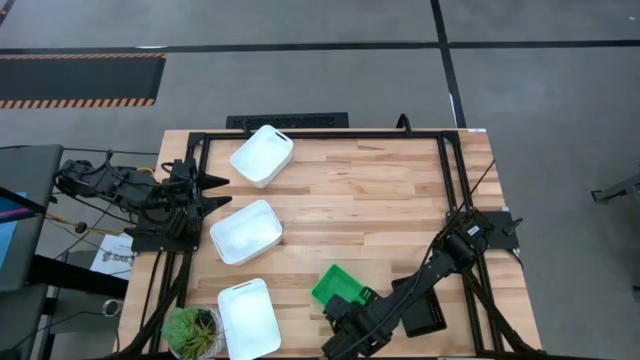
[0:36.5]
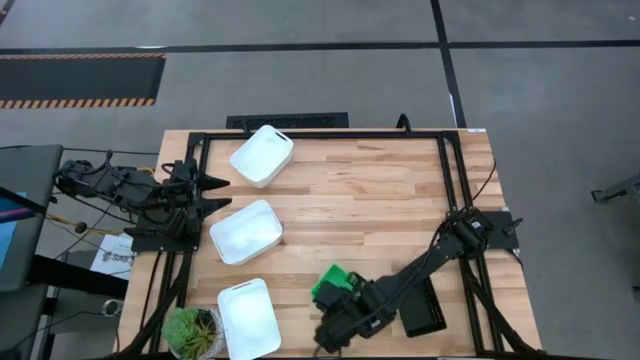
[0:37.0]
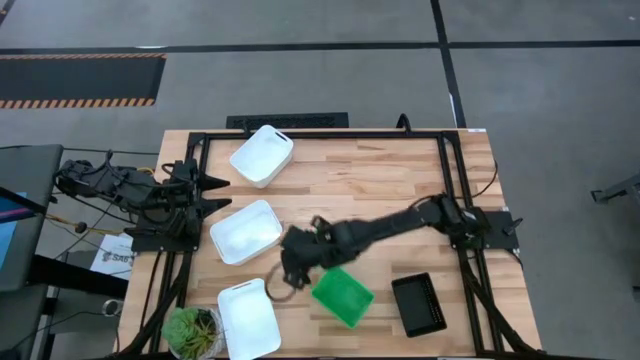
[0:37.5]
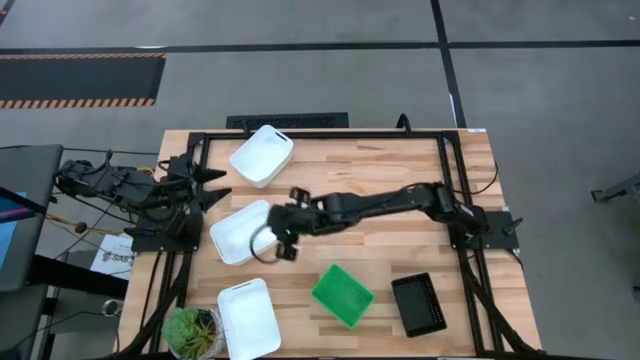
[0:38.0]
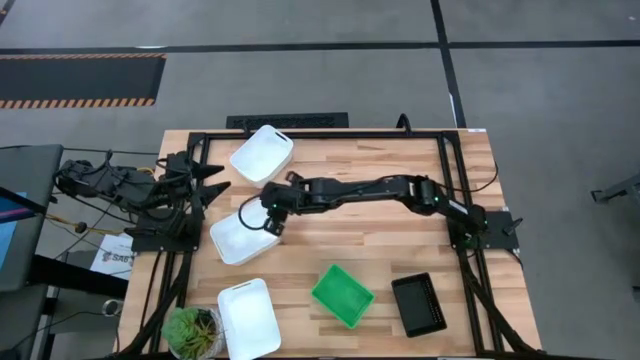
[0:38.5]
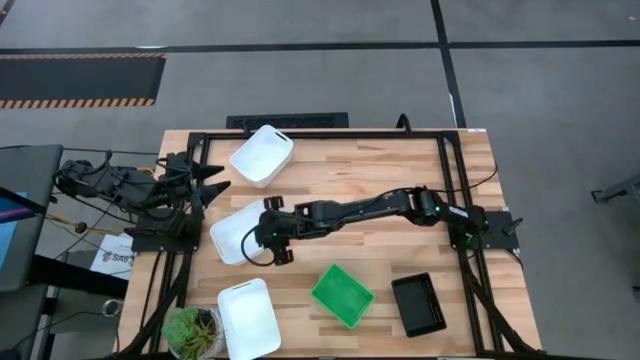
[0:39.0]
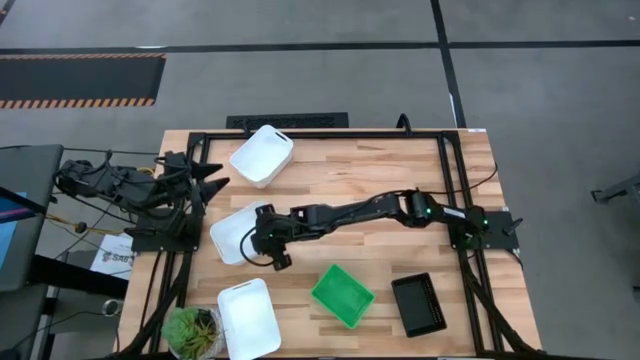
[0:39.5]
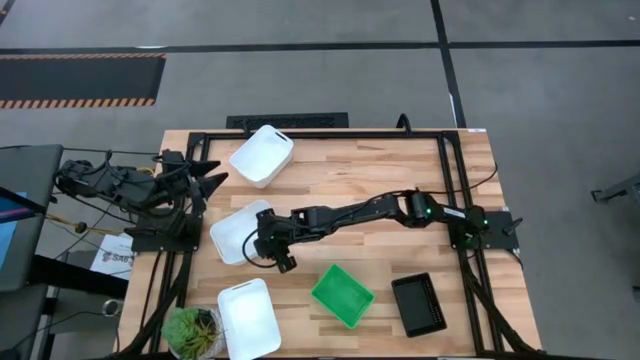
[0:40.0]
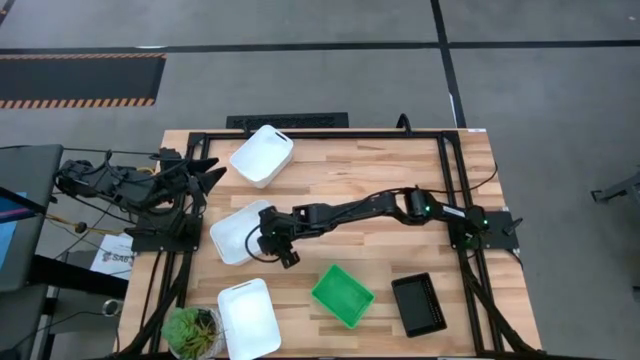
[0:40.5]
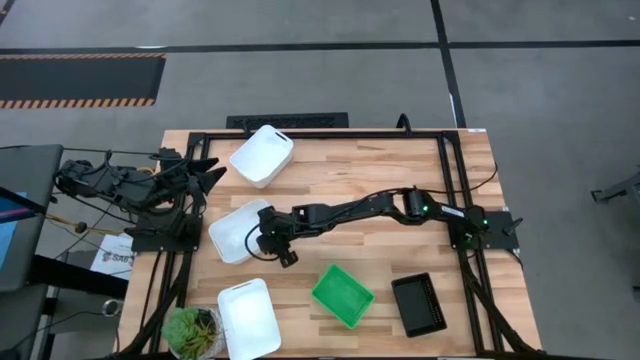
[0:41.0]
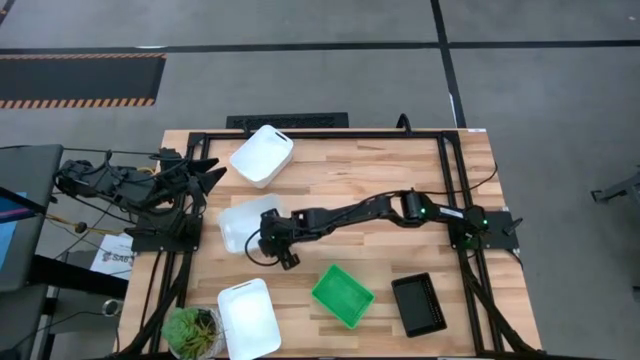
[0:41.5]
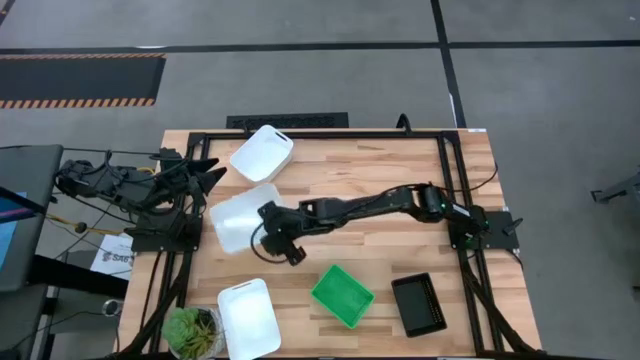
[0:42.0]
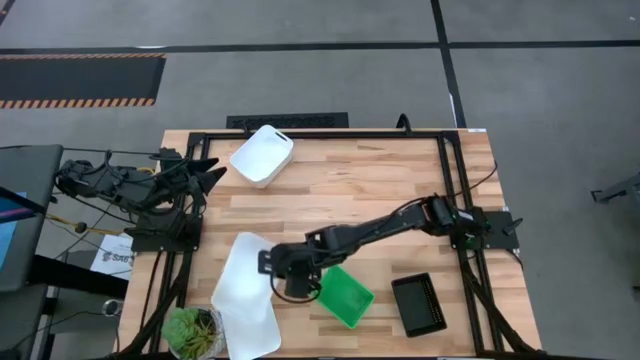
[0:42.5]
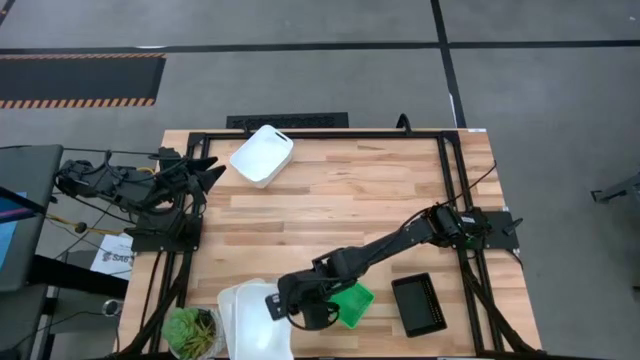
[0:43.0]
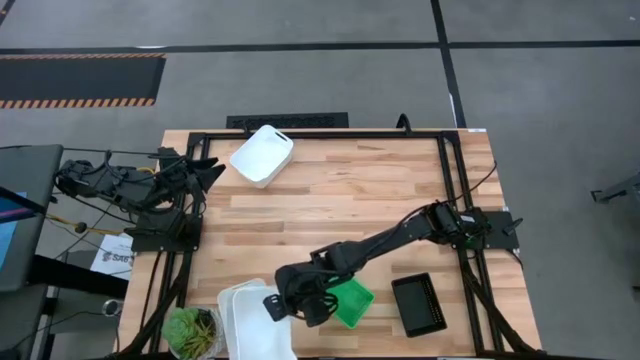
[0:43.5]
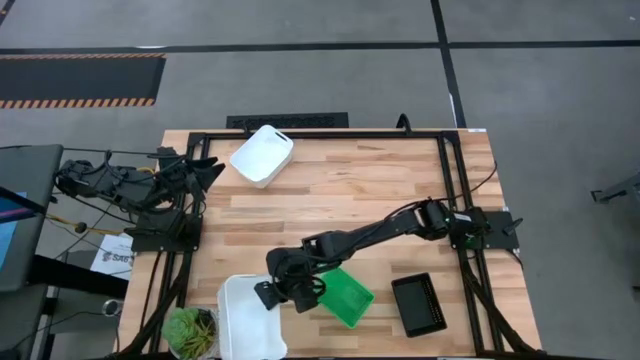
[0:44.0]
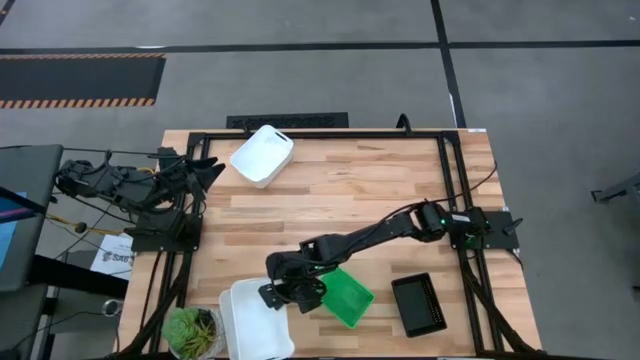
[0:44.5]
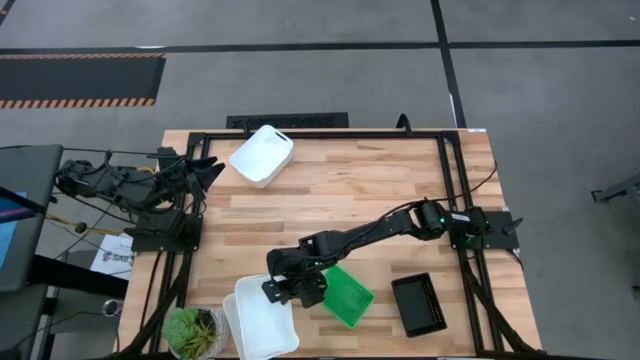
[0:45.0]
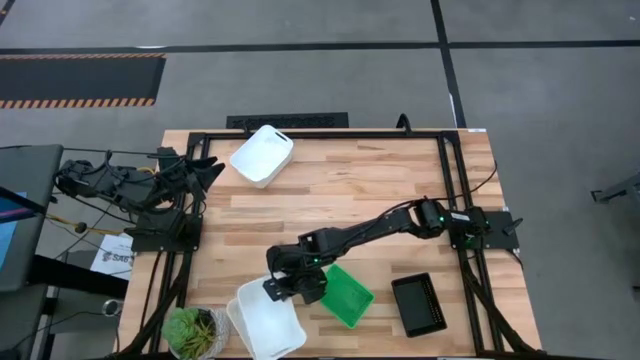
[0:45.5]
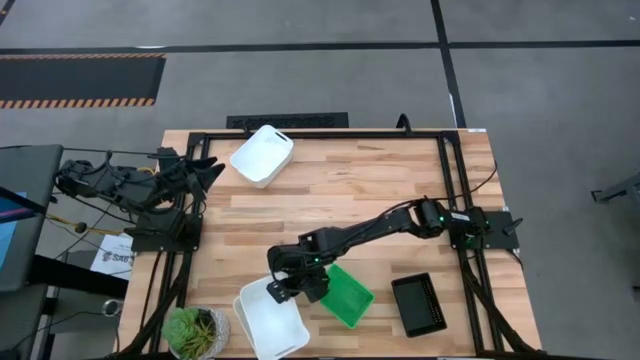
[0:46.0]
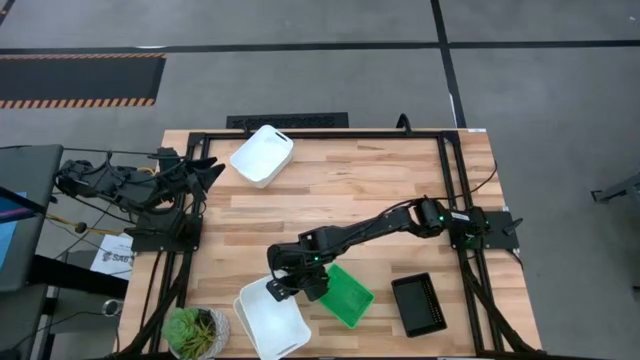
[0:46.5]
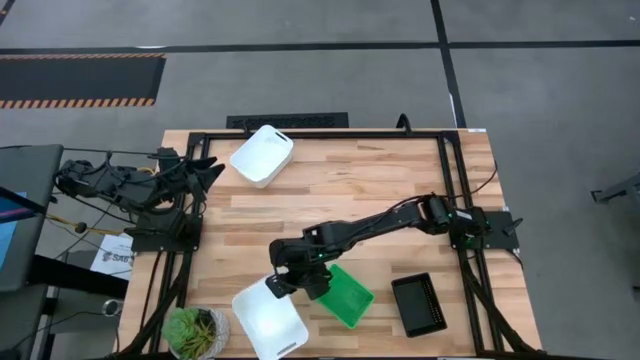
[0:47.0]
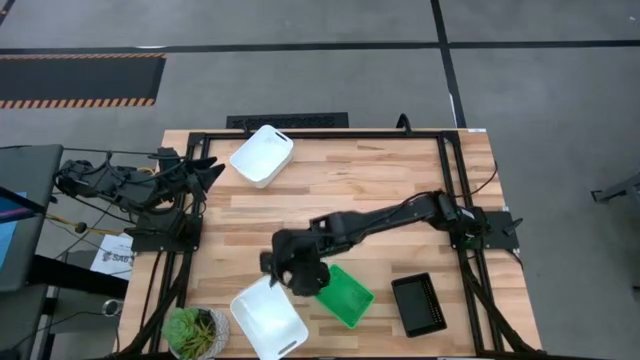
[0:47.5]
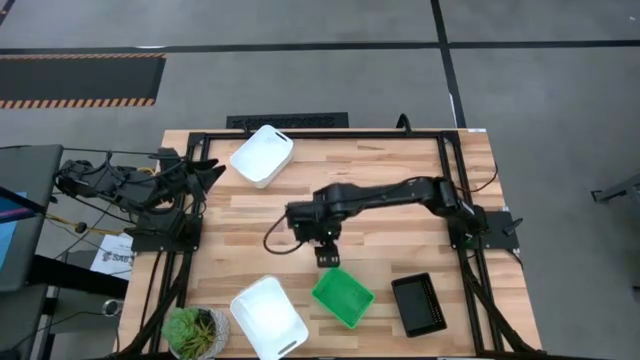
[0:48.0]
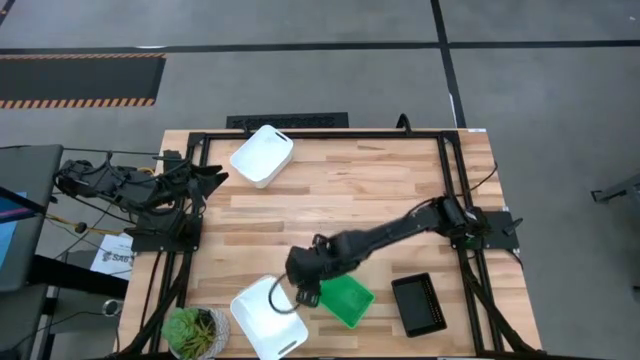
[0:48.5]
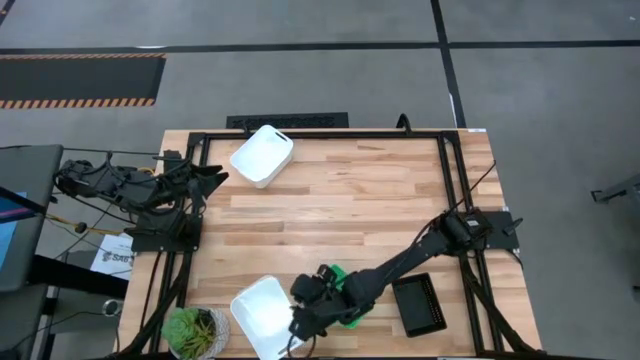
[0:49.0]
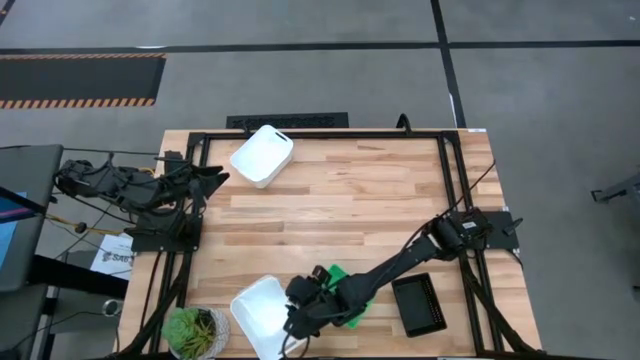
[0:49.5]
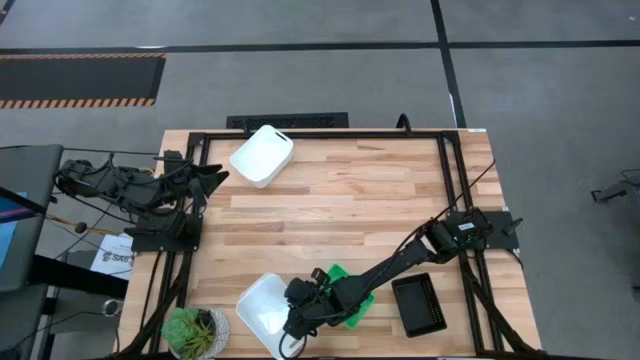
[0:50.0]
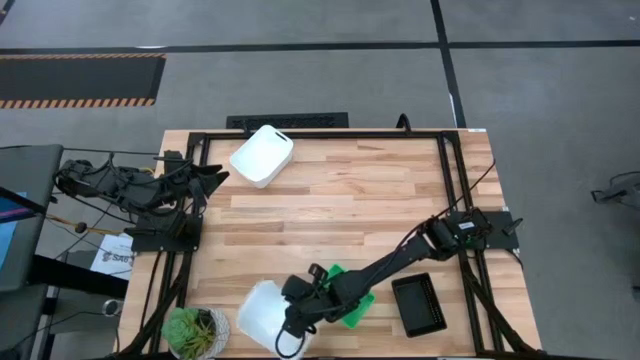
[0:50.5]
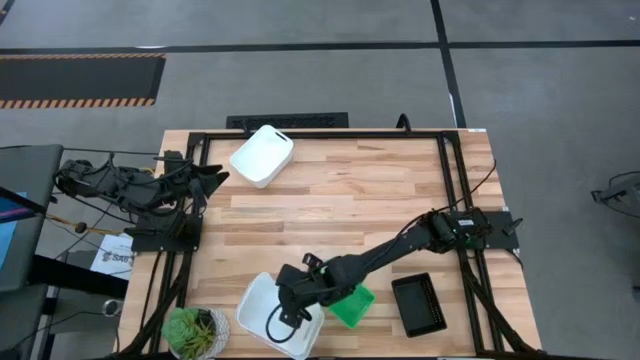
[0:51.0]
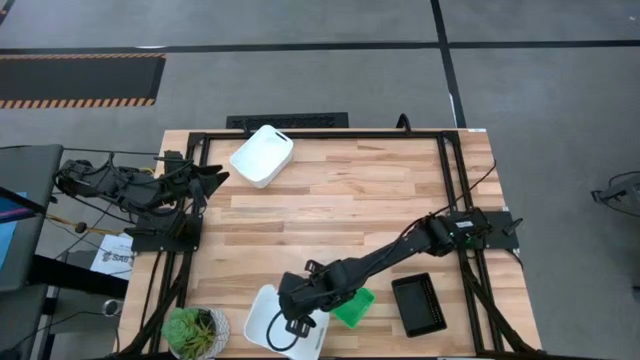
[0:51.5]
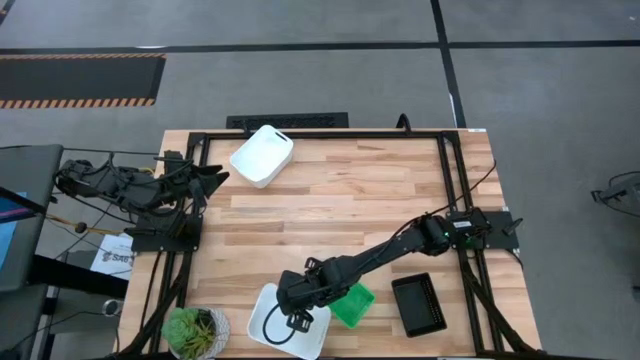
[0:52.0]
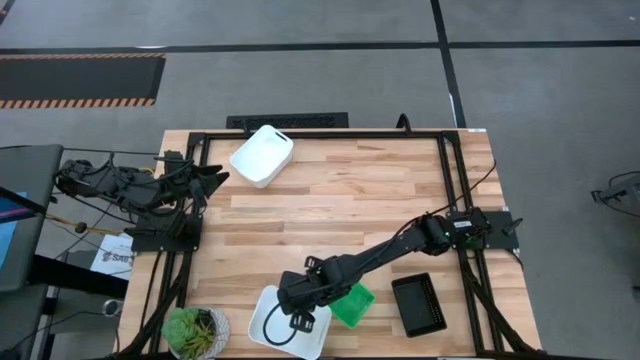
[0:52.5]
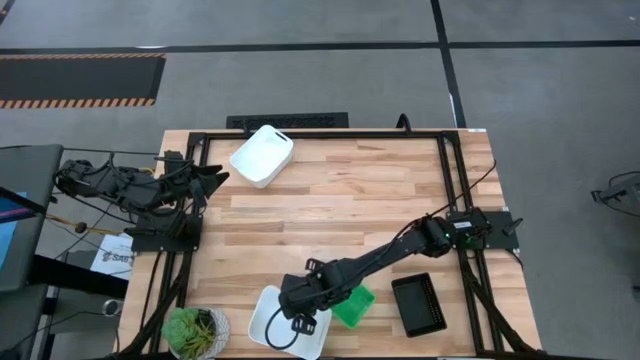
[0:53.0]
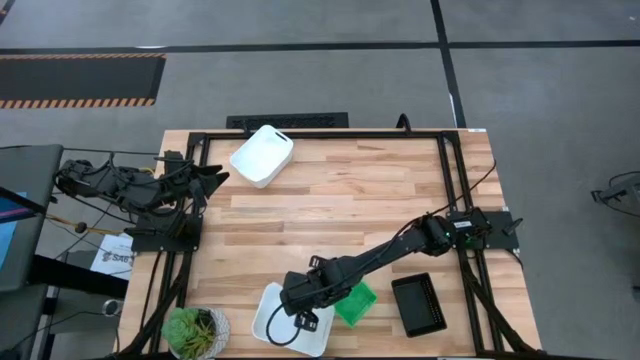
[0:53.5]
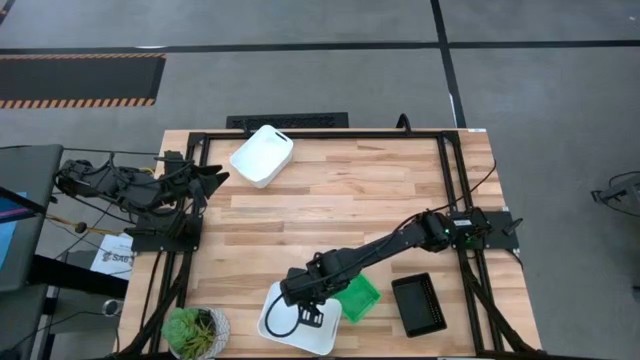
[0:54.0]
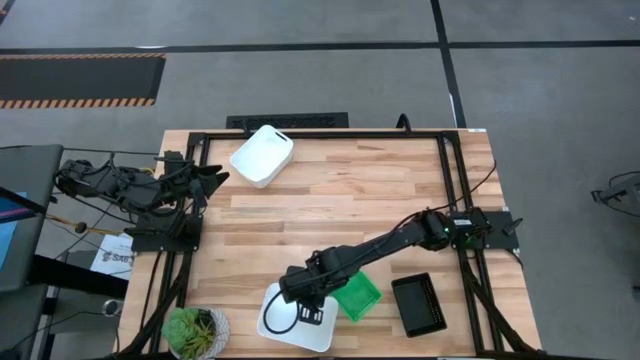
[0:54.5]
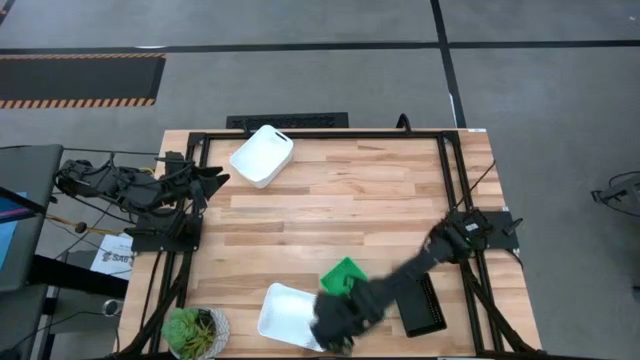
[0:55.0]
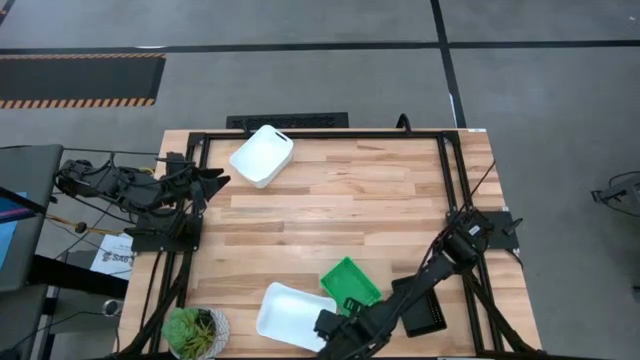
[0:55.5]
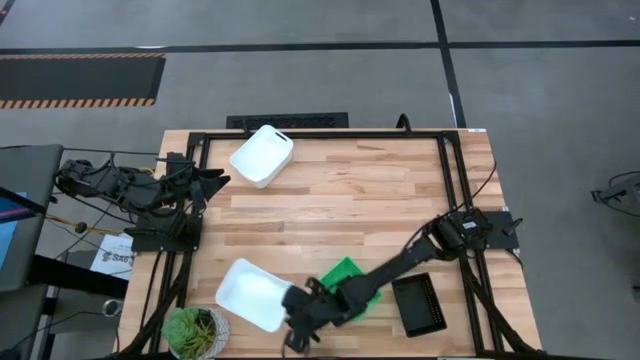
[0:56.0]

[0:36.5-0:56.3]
Stack the middle white bin on the bottom white bin
